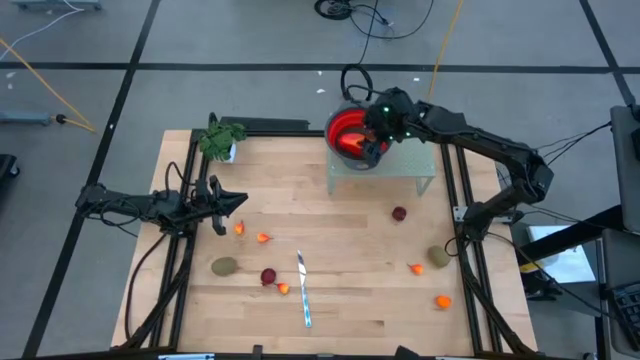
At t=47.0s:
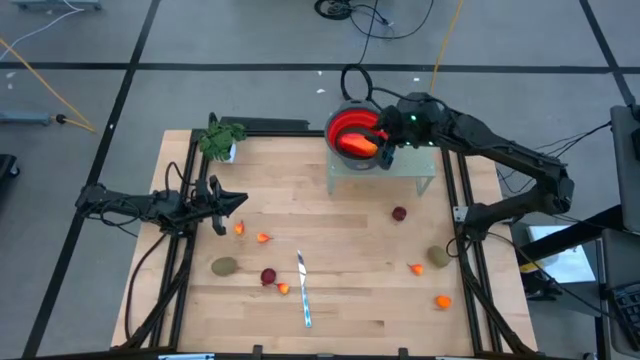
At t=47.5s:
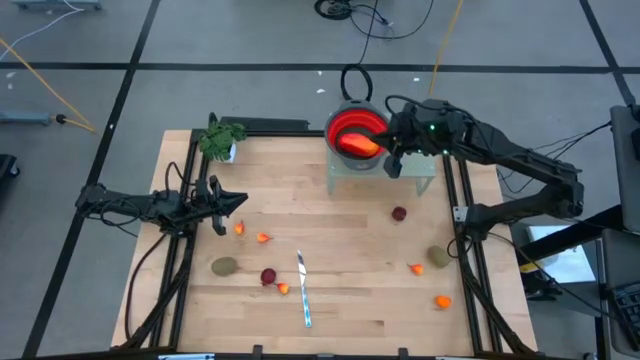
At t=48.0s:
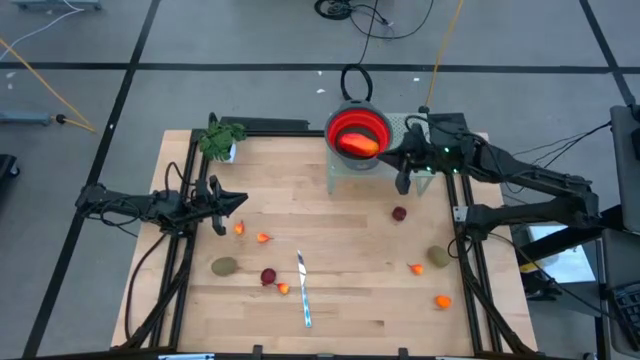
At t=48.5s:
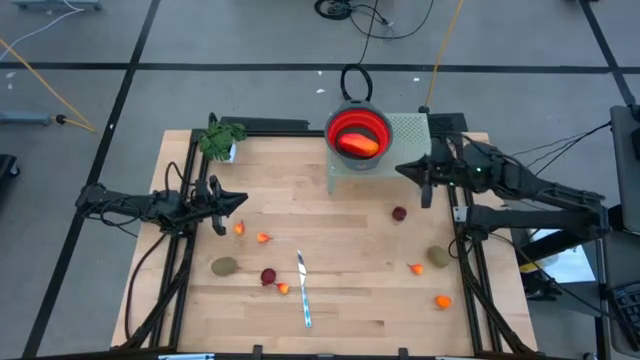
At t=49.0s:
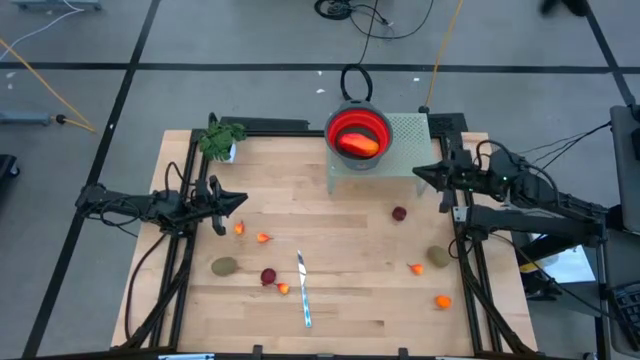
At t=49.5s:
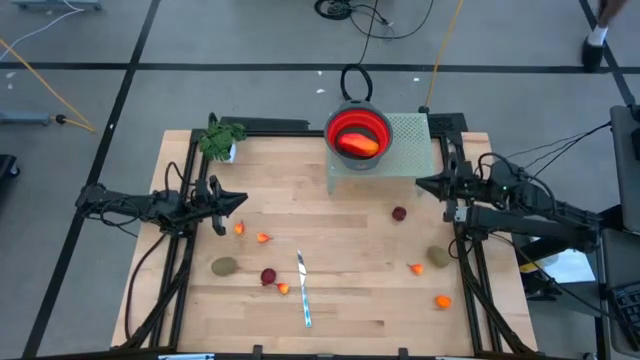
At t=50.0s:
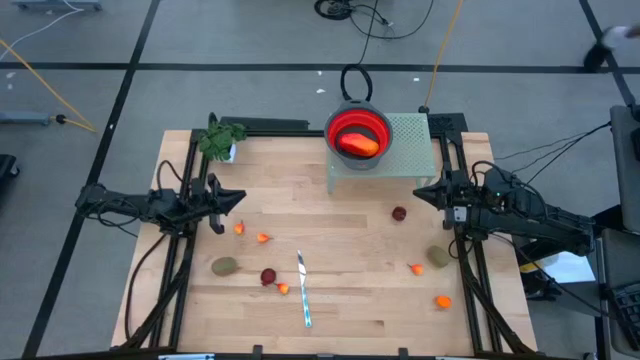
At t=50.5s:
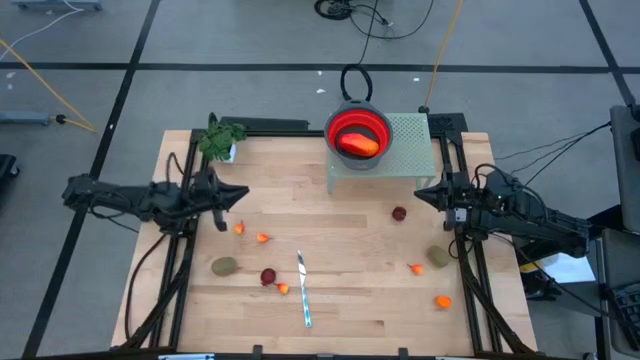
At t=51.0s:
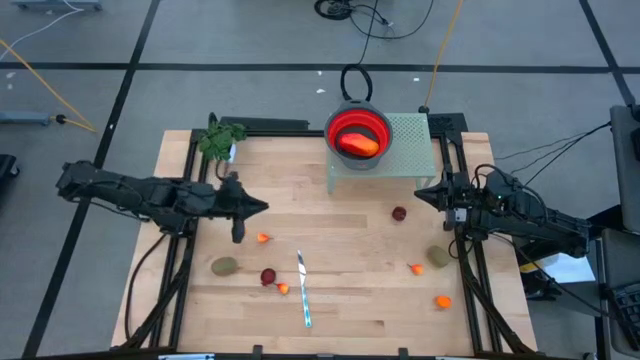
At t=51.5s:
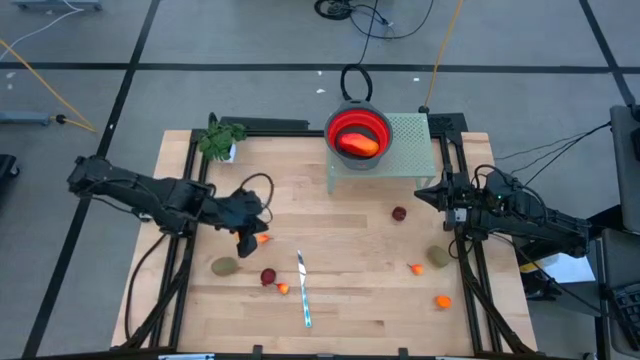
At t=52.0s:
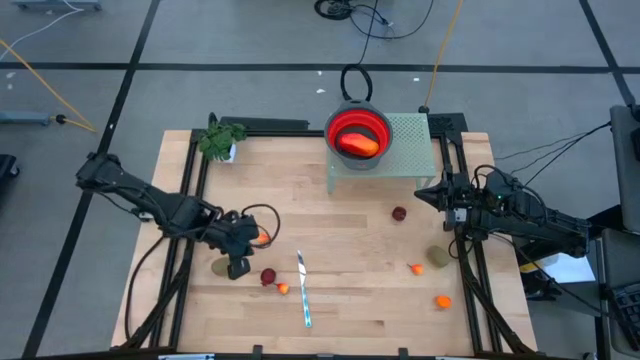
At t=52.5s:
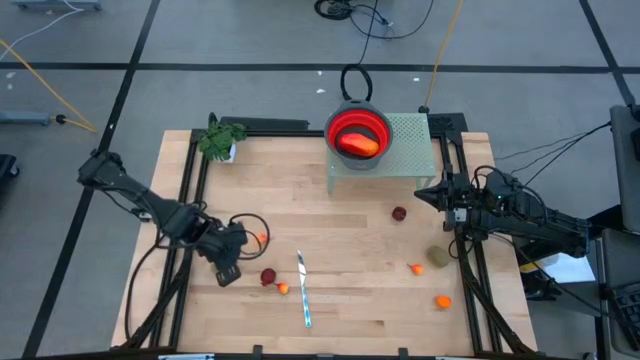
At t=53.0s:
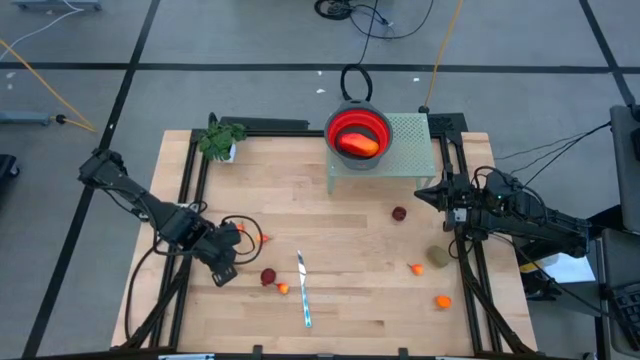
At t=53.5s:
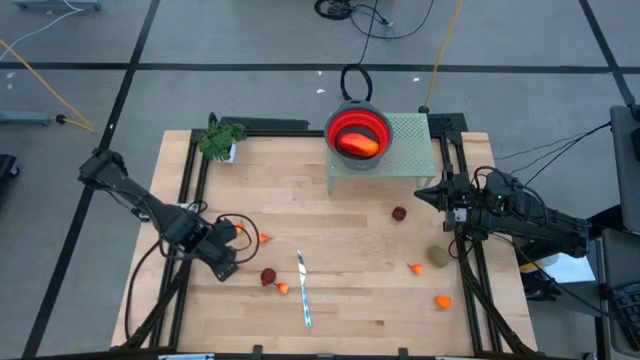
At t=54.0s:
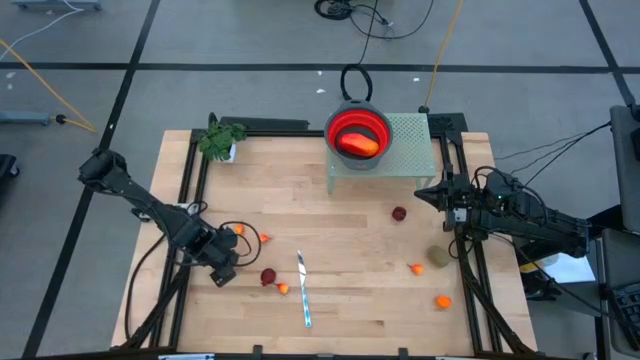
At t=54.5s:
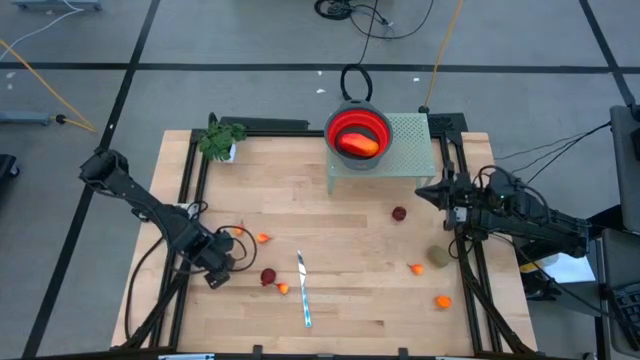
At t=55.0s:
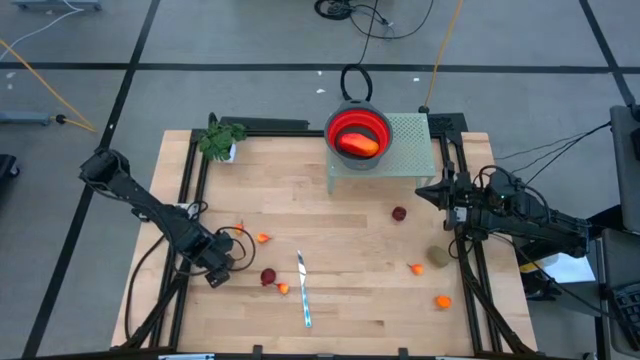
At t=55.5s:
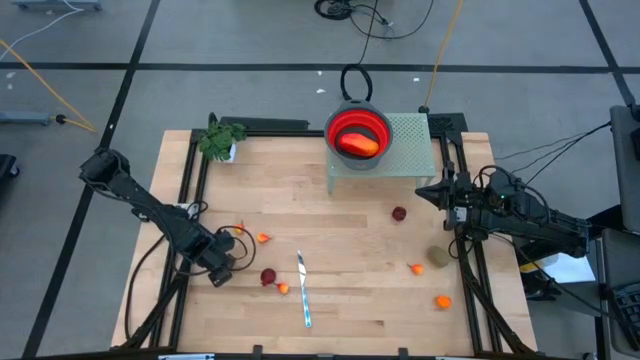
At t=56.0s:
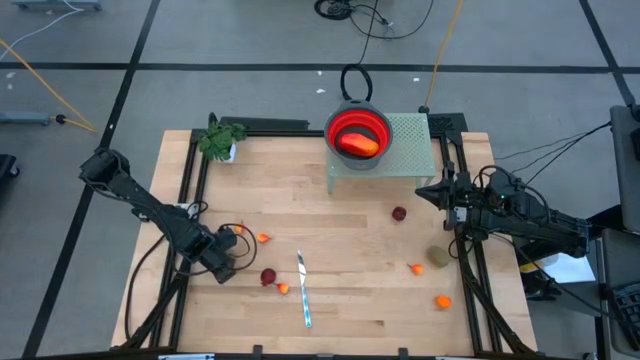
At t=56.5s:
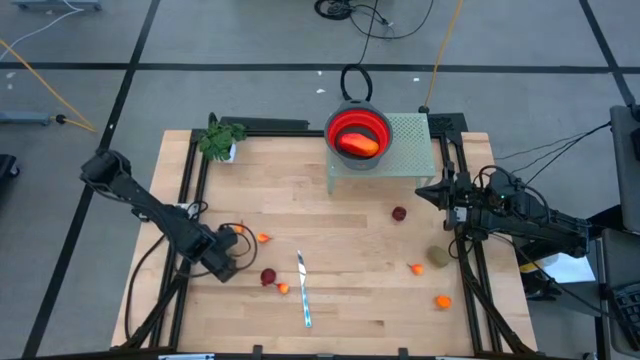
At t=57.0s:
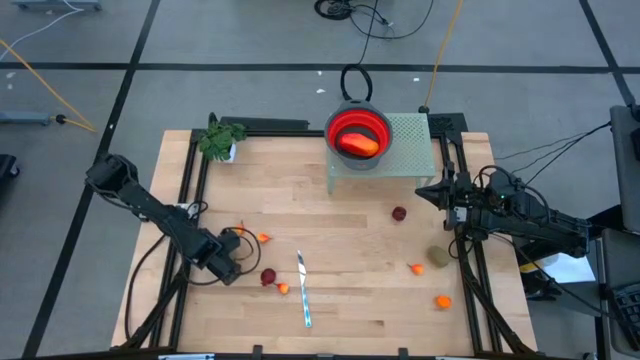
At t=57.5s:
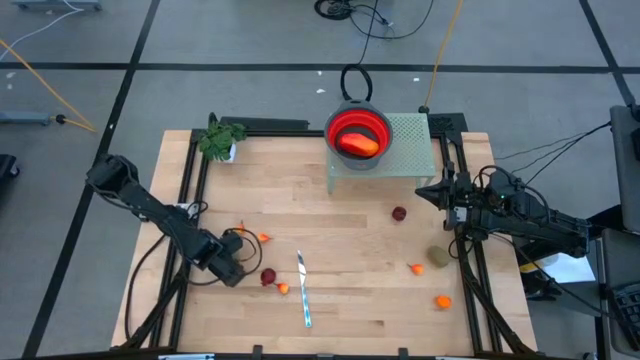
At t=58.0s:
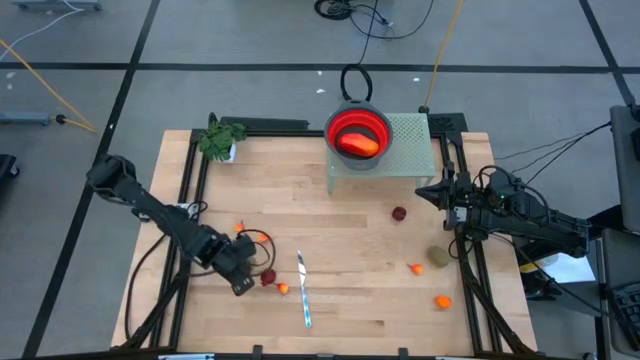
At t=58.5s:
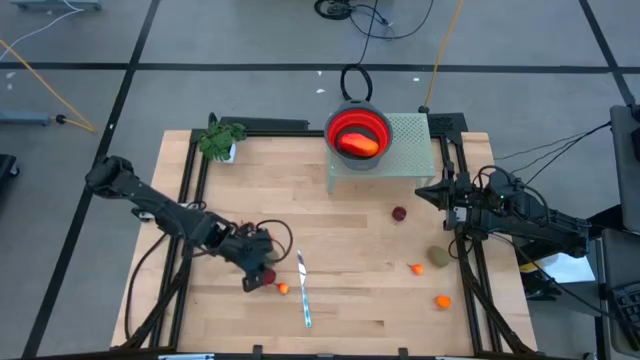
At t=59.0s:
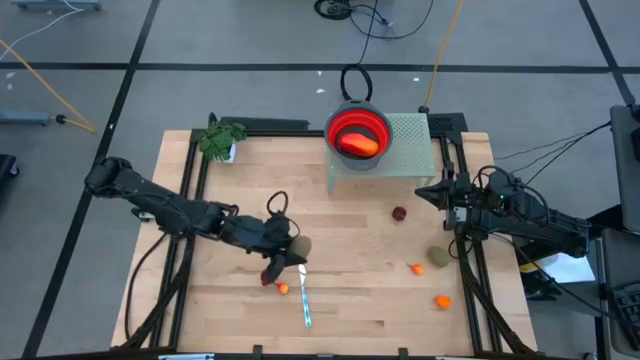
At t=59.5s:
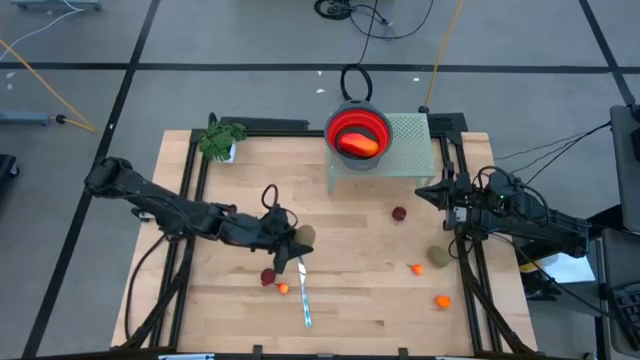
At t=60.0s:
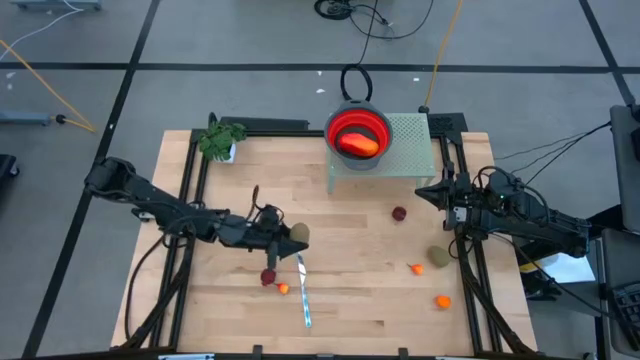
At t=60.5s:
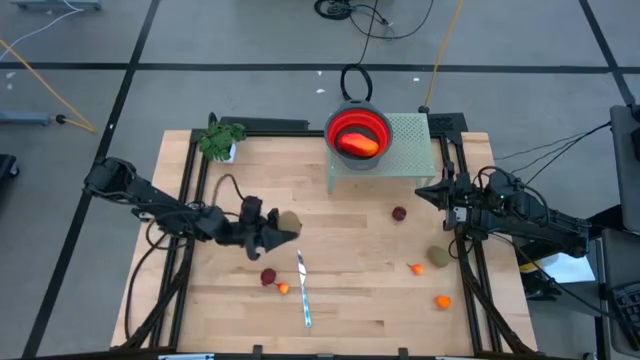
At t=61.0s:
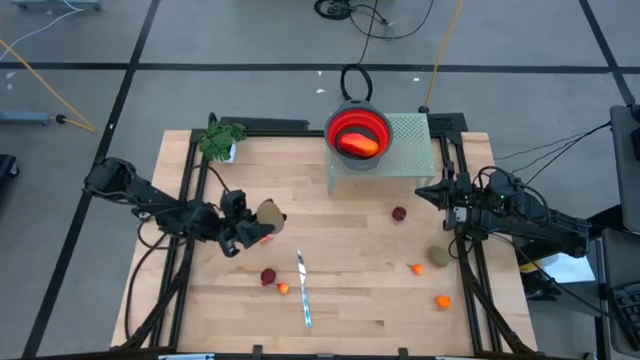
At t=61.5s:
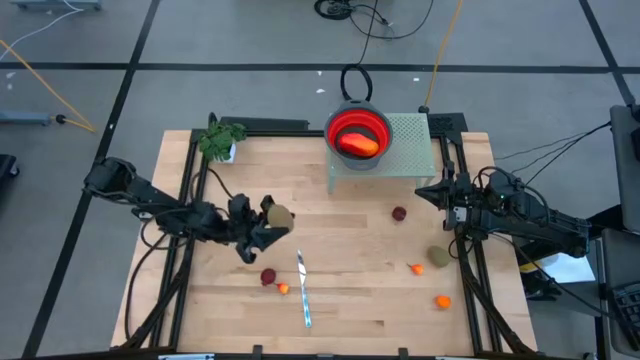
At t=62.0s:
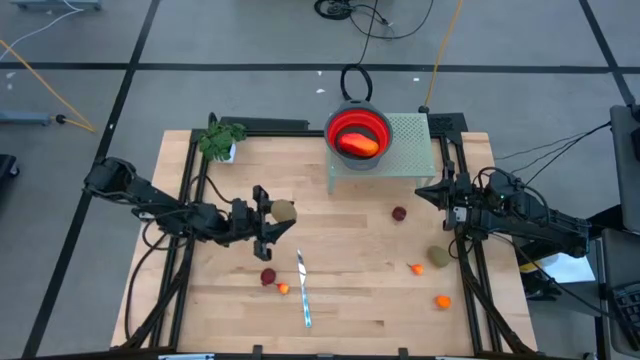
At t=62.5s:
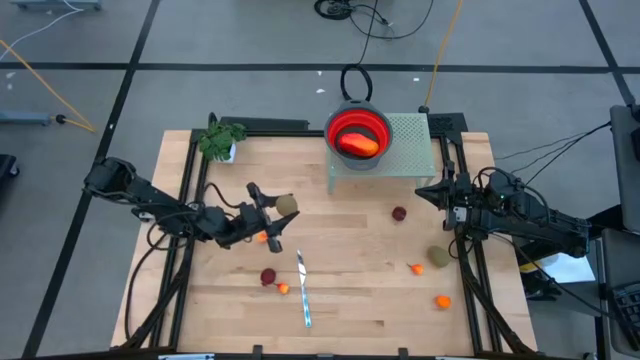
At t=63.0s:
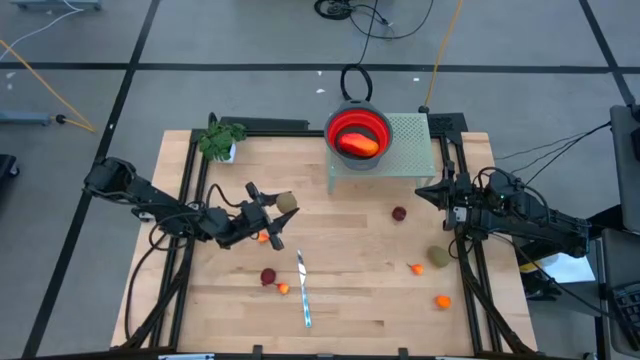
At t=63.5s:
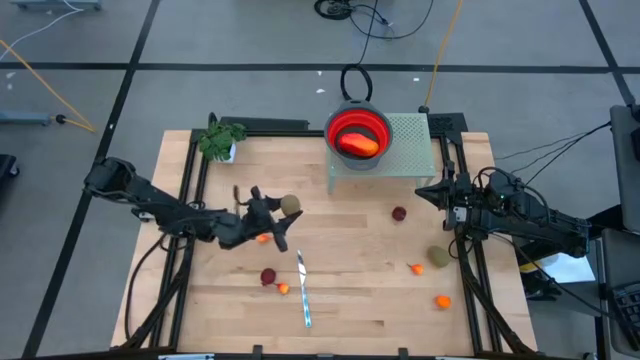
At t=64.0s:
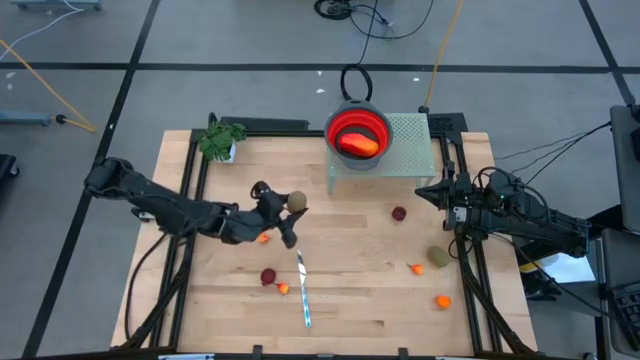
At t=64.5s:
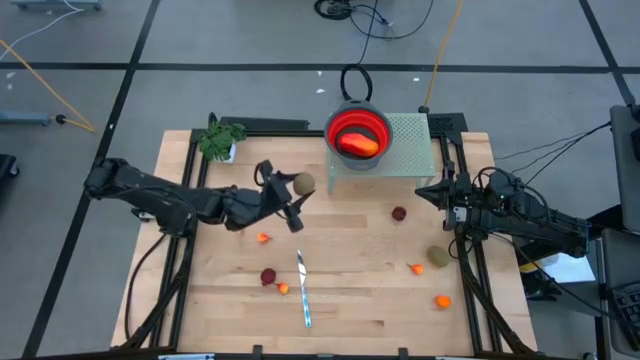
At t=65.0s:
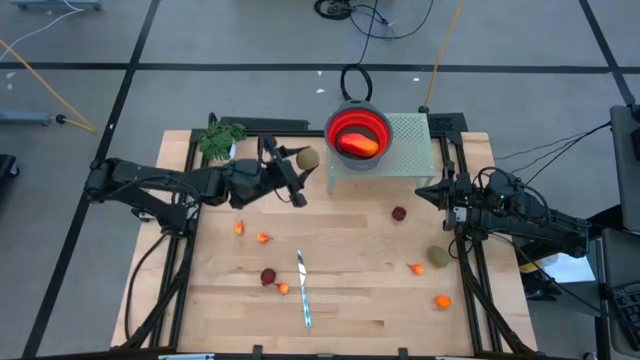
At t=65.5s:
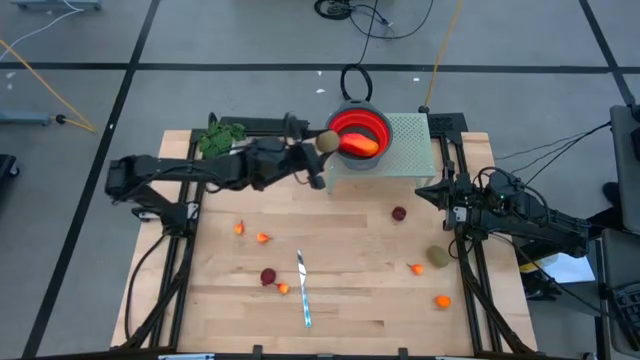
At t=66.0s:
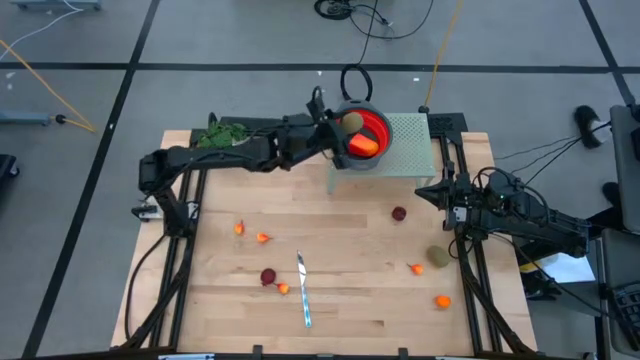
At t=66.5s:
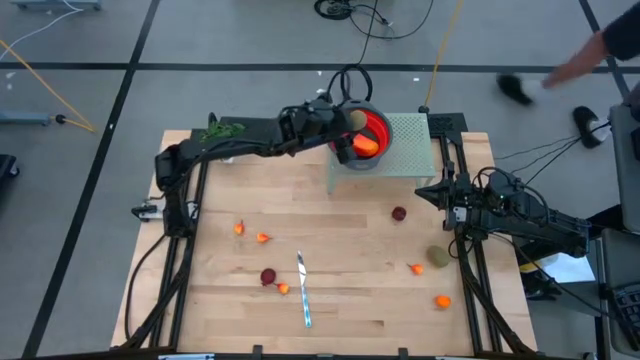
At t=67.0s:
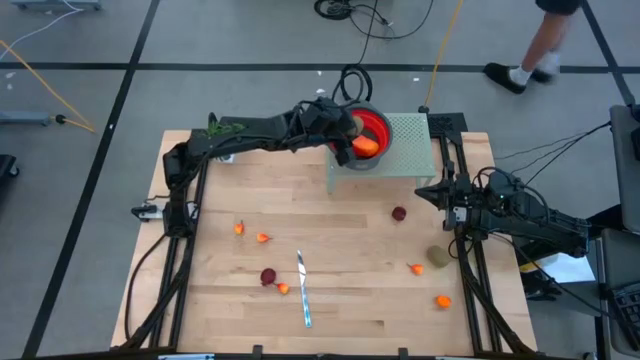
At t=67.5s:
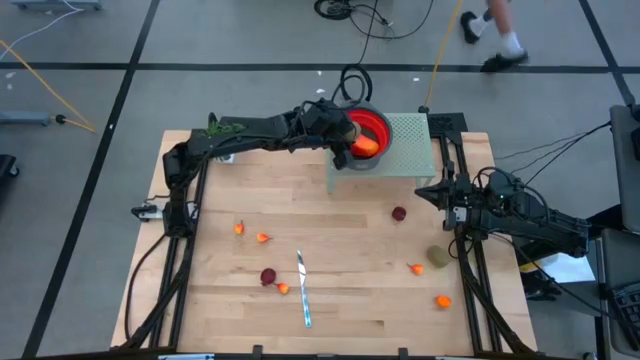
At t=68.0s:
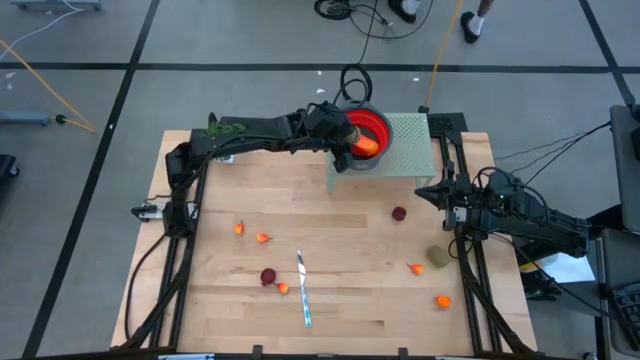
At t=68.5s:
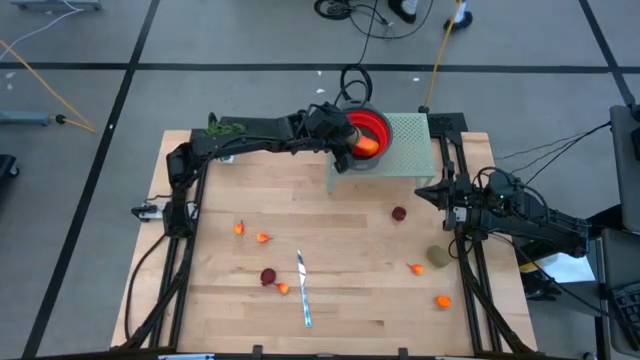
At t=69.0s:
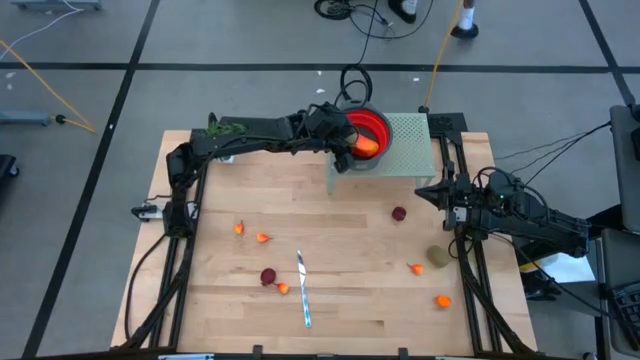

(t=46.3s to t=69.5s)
Task: Pick & Place Fruit
Put the kiwi into the red strainer bowl on the shelf
